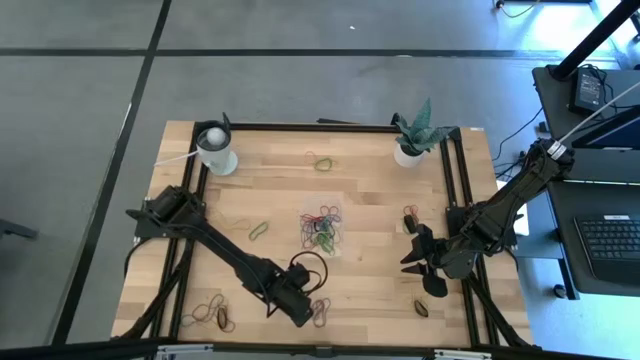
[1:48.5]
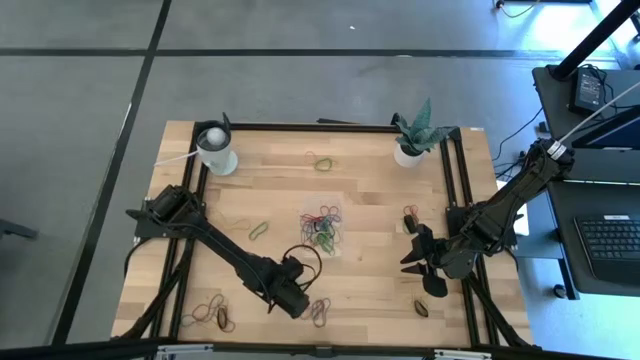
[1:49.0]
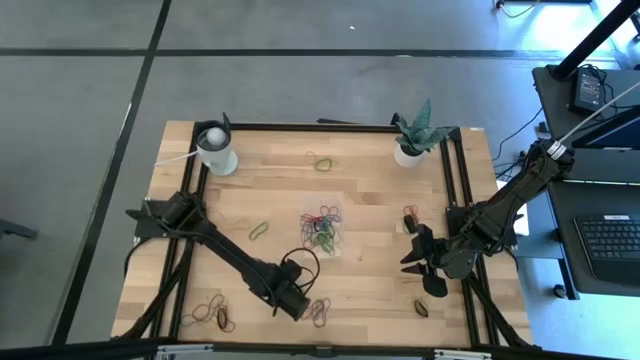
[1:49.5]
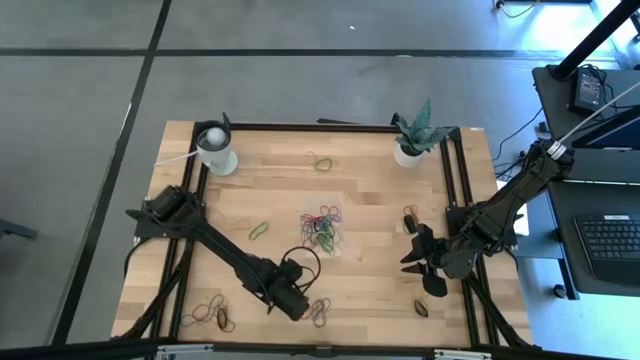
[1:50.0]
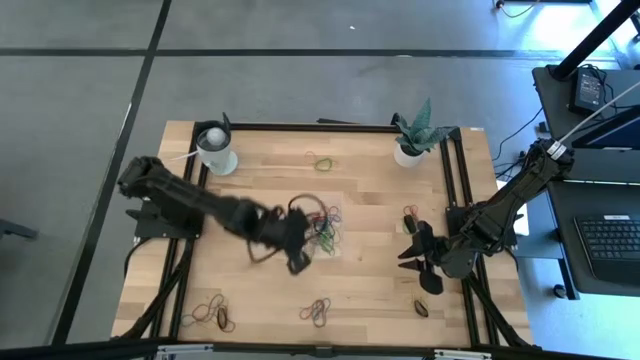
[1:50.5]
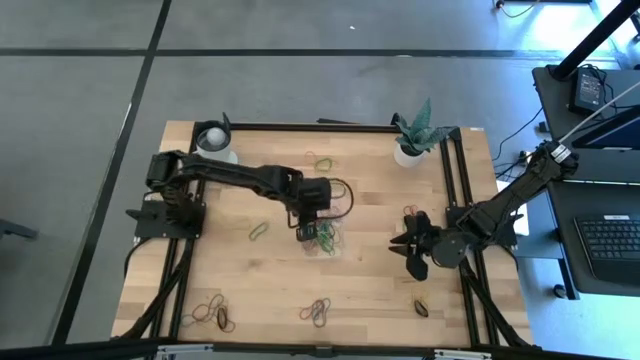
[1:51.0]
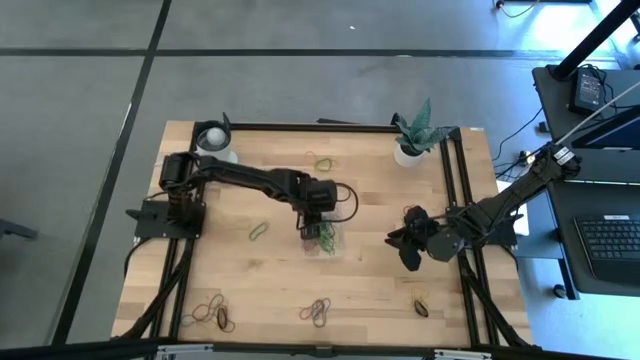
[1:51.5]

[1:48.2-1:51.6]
Task: Pick and place rubber bands into bin
Put the green rubber band into the transparent bin

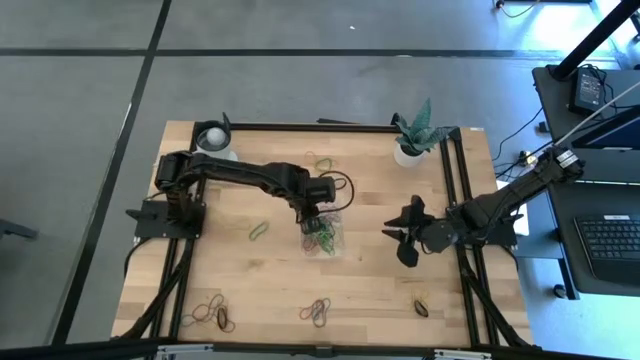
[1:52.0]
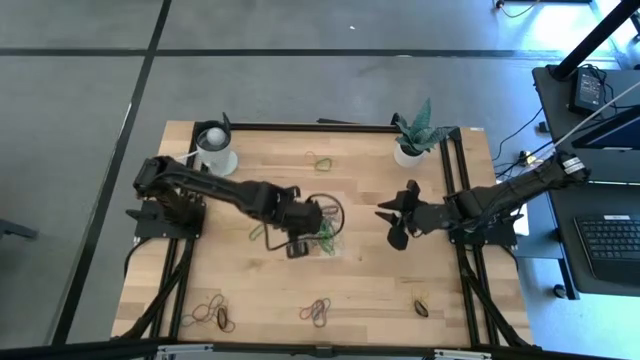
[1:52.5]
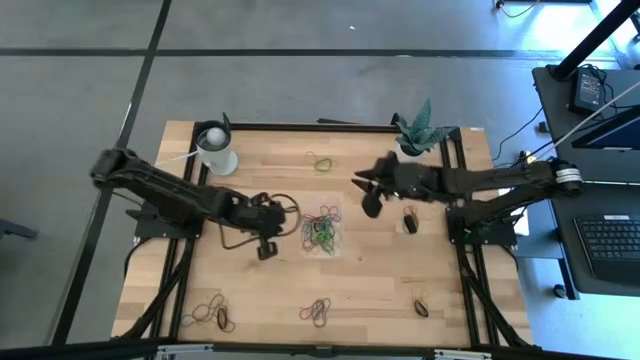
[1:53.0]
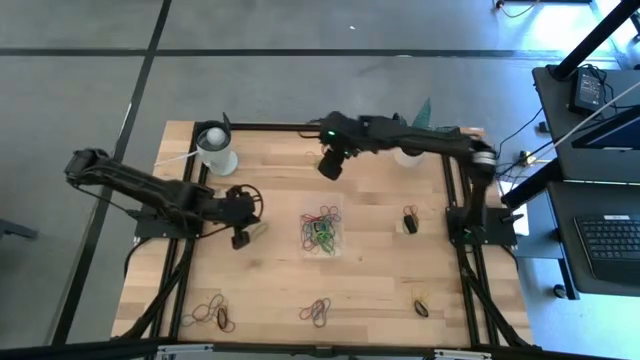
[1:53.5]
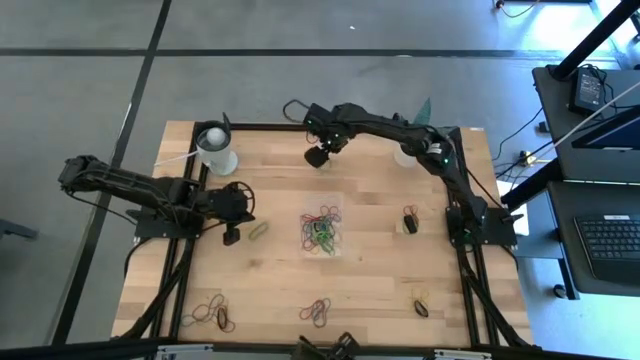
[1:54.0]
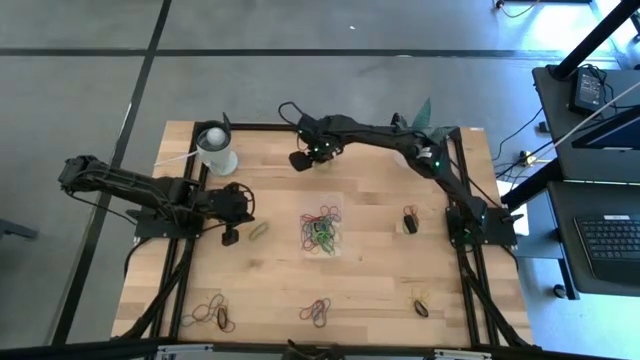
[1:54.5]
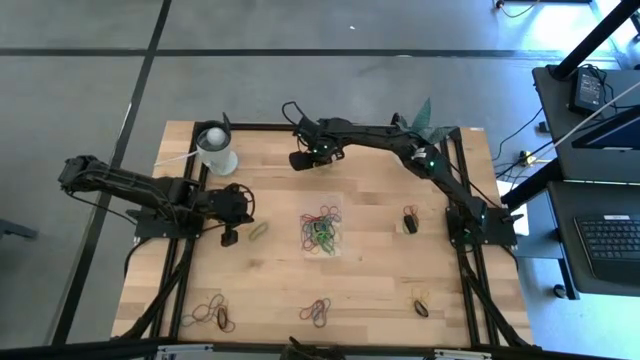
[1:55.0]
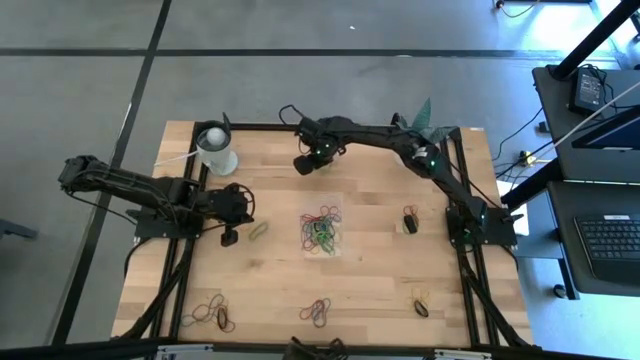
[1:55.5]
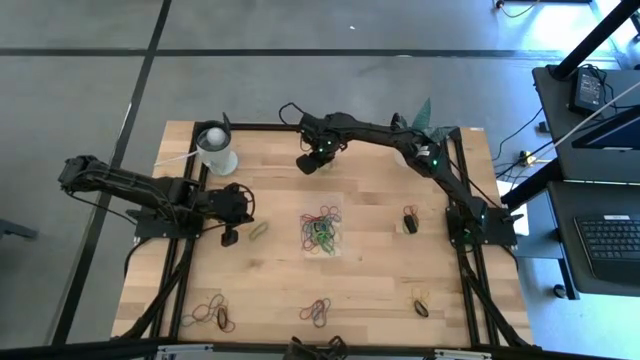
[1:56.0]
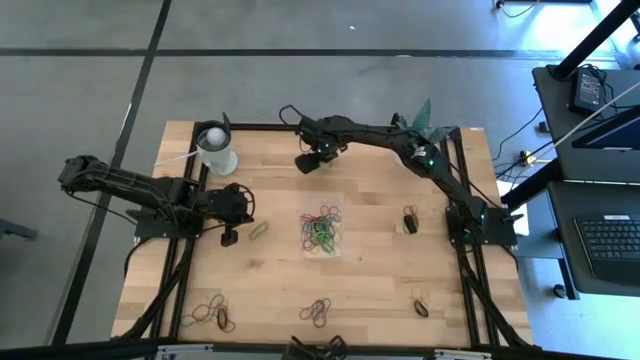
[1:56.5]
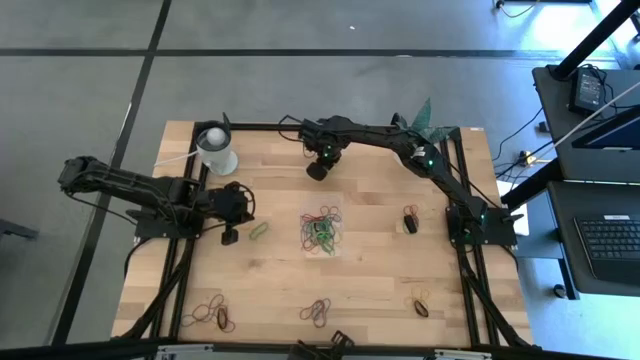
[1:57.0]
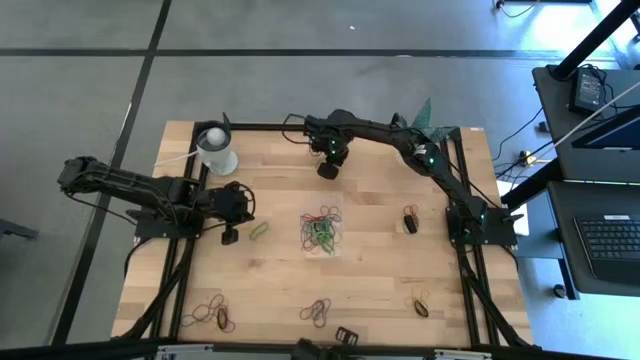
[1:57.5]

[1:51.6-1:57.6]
Put the yellow rubber band into the transparent bin

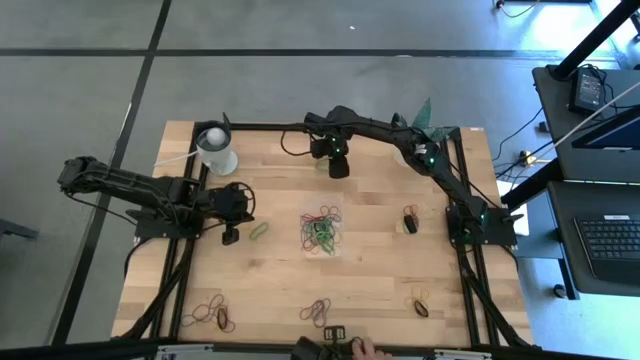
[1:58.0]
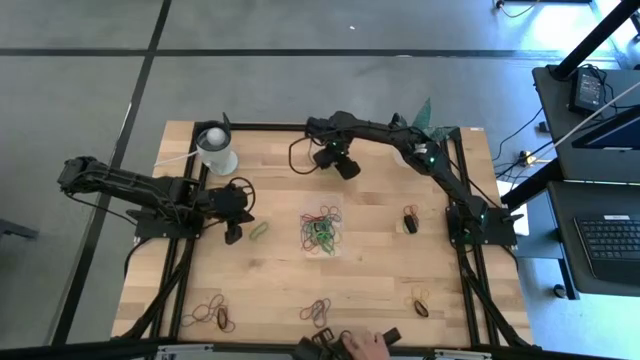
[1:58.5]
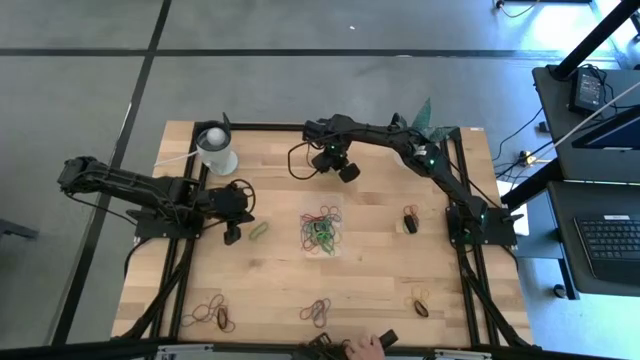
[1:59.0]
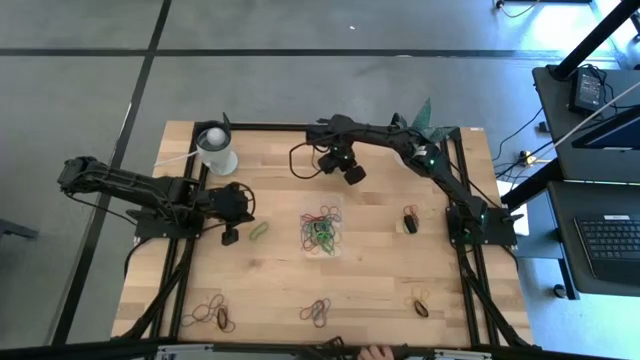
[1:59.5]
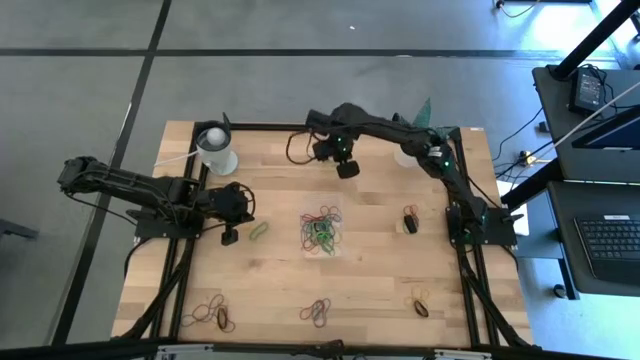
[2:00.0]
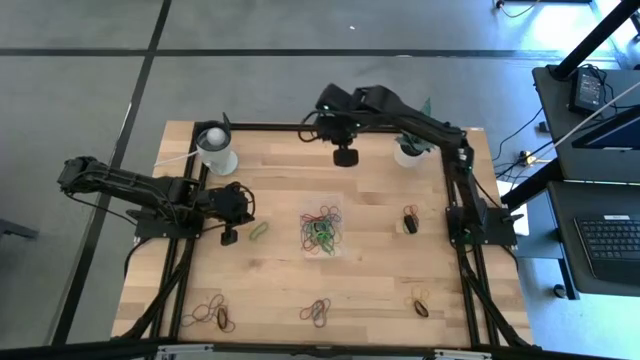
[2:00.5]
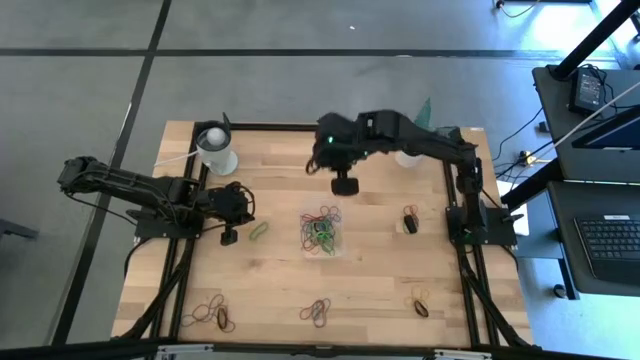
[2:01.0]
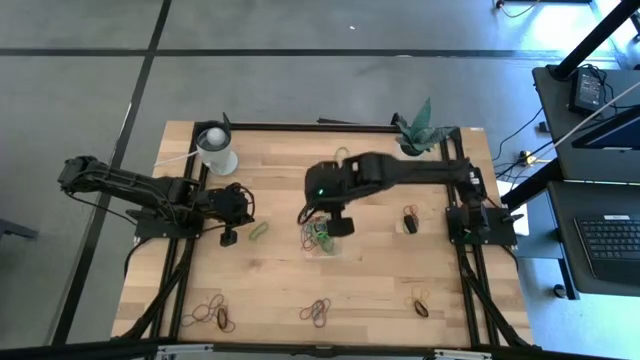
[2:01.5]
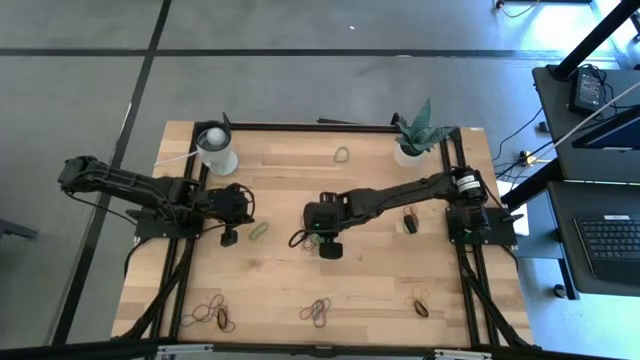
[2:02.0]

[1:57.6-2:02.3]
Put the yellow rubber band into the transparent bin

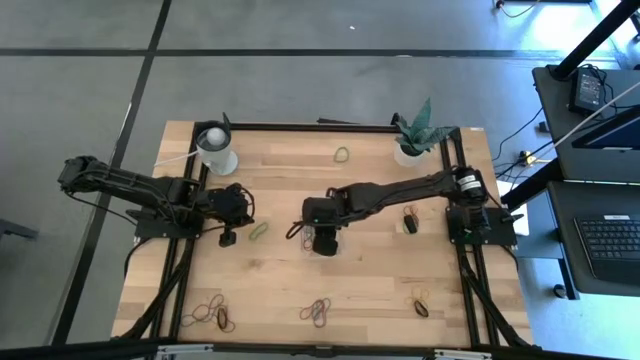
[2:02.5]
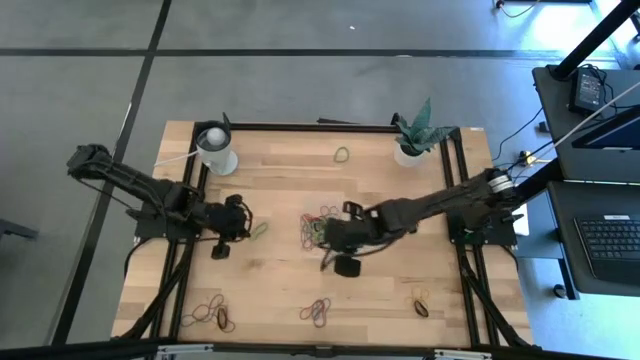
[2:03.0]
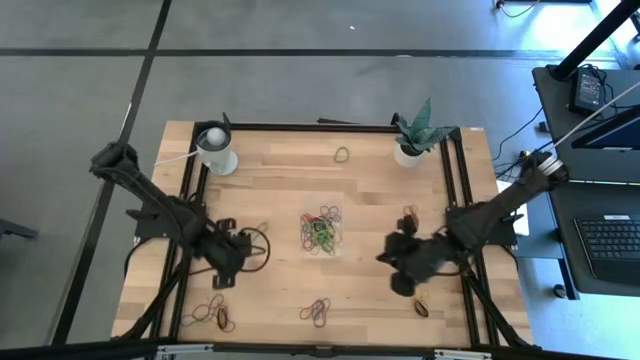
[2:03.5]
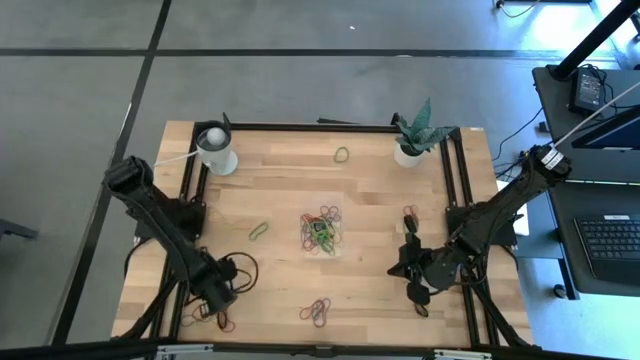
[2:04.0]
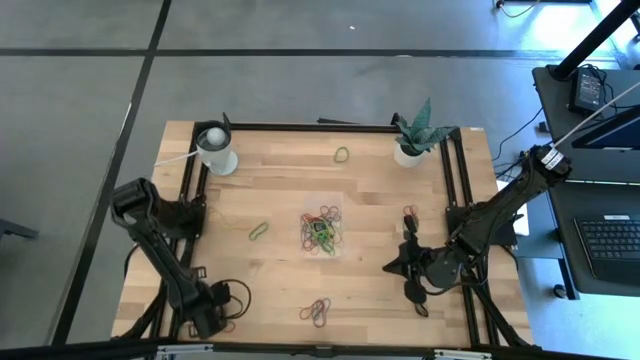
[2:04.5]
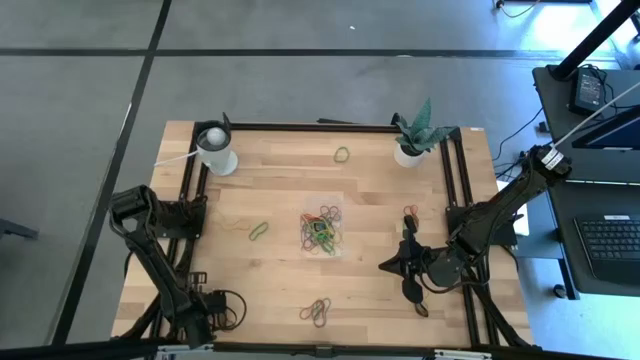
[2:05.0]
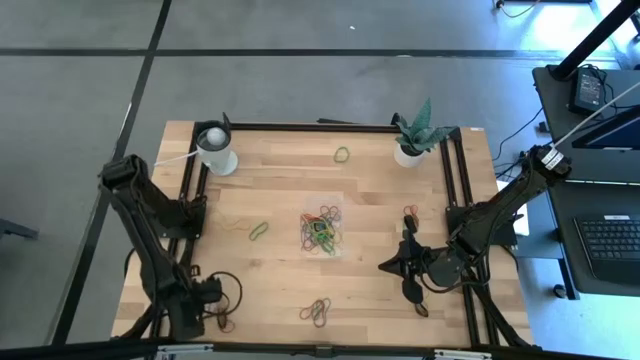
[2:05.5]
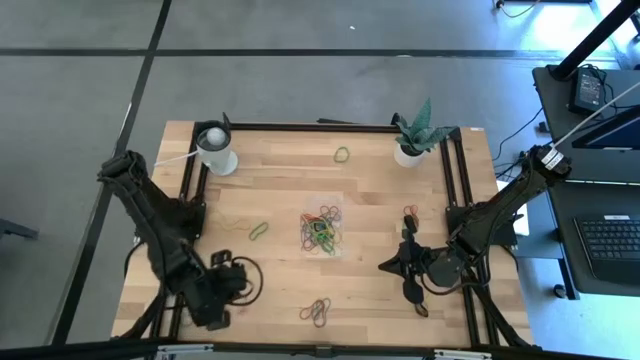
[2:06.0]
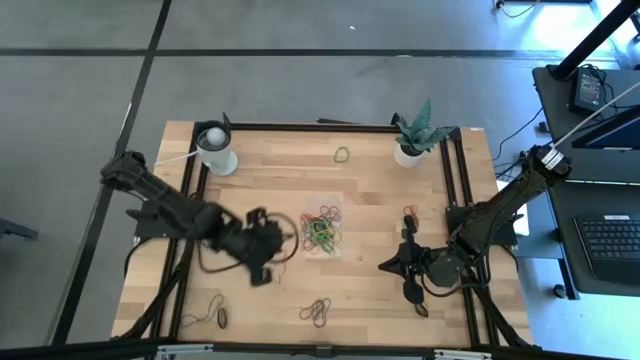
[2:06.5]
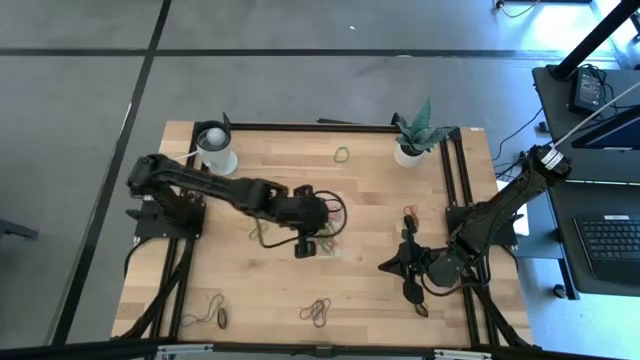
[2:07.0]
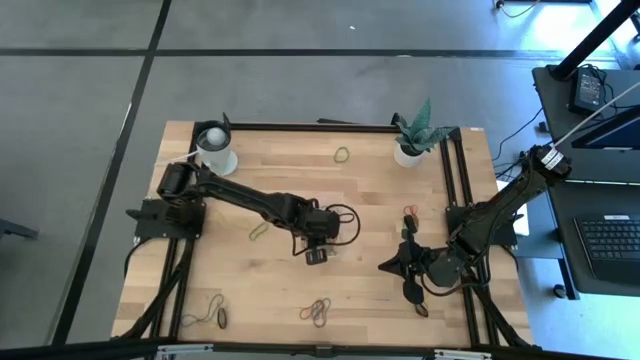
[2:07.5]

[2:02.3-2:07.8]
Put the red rubber band into the transparent bin
